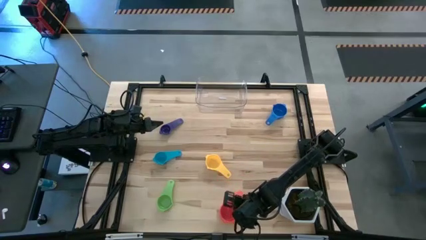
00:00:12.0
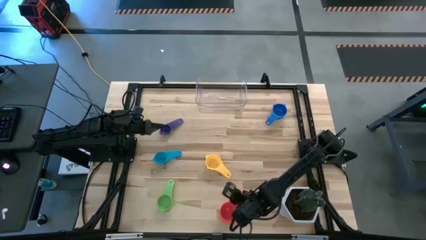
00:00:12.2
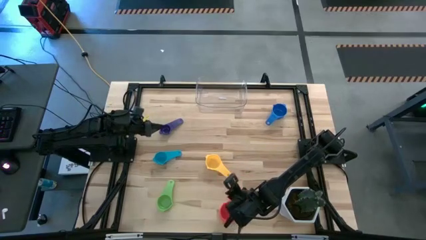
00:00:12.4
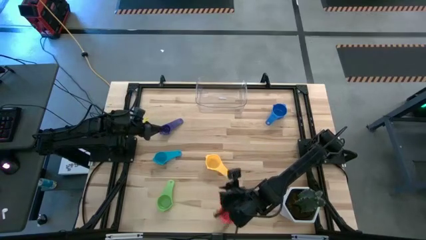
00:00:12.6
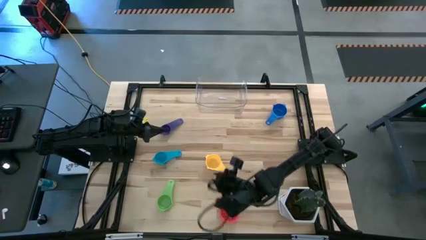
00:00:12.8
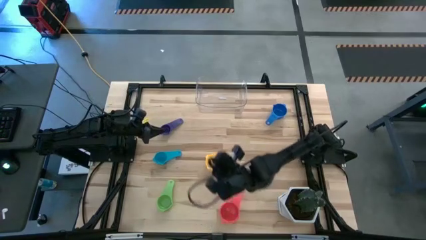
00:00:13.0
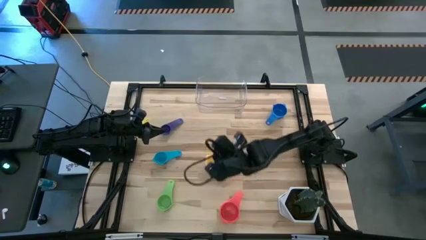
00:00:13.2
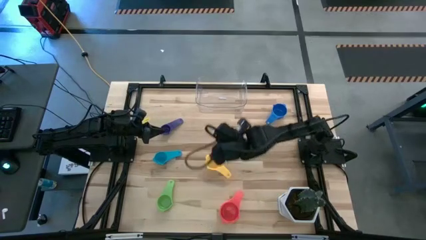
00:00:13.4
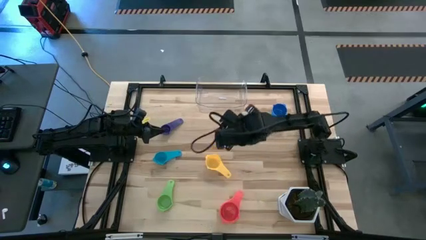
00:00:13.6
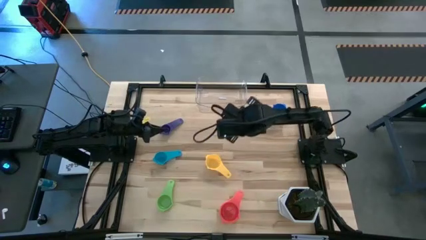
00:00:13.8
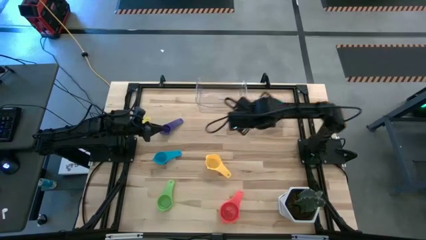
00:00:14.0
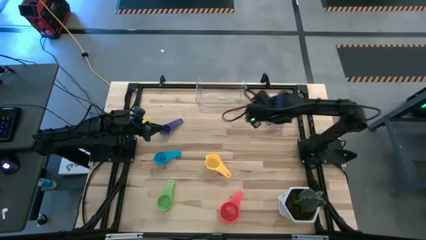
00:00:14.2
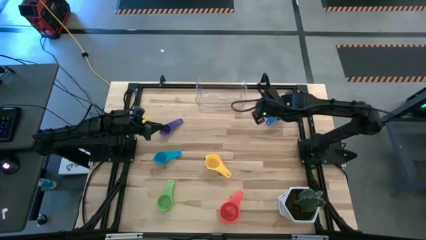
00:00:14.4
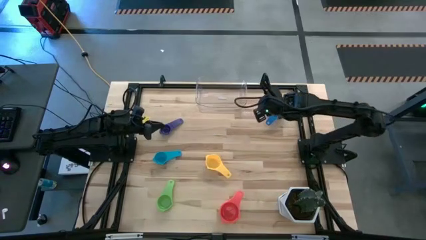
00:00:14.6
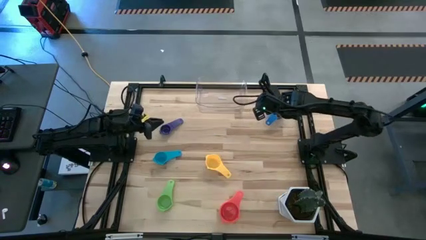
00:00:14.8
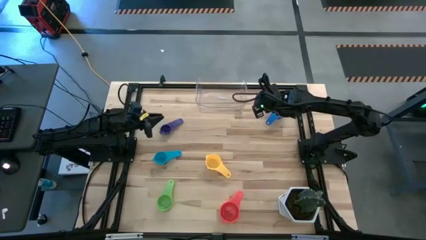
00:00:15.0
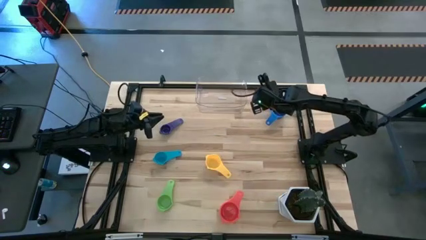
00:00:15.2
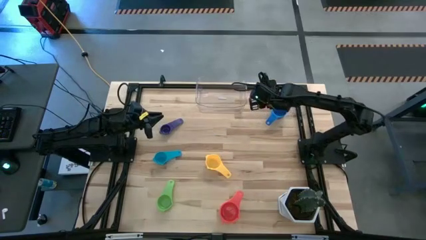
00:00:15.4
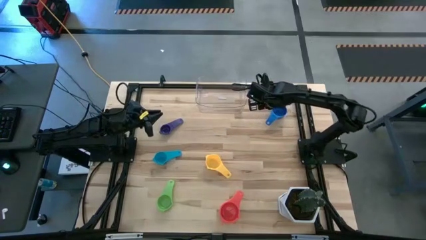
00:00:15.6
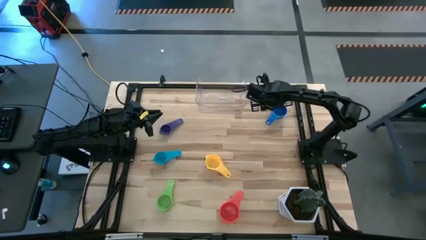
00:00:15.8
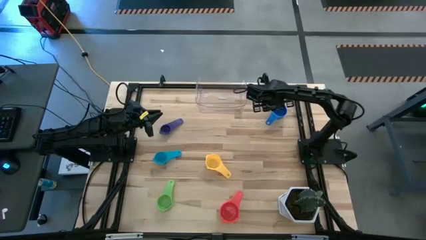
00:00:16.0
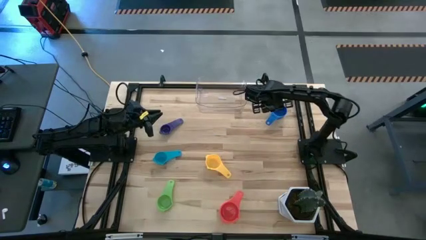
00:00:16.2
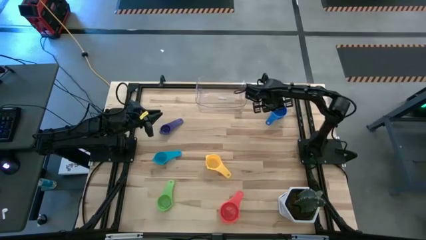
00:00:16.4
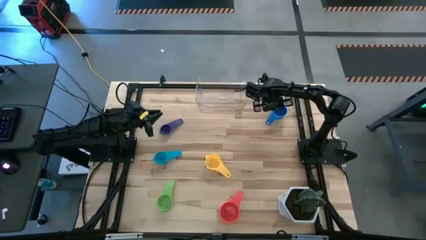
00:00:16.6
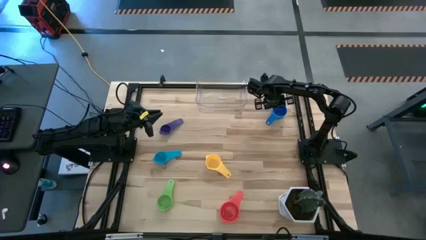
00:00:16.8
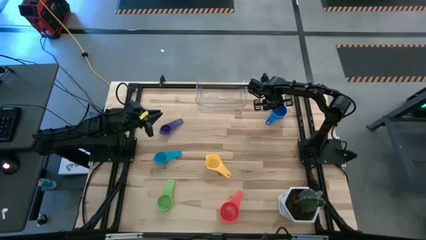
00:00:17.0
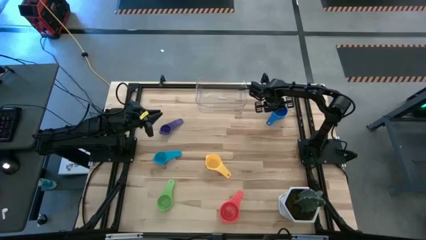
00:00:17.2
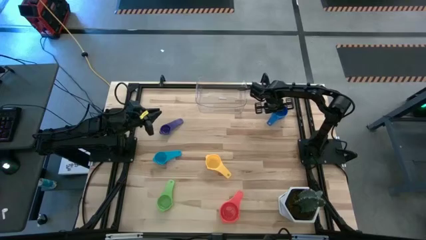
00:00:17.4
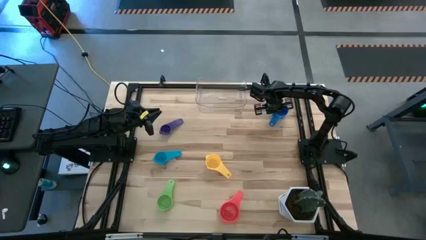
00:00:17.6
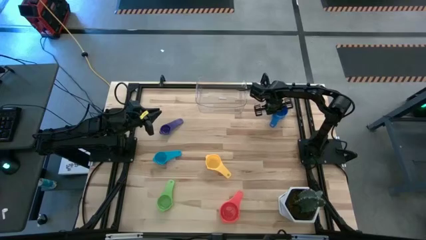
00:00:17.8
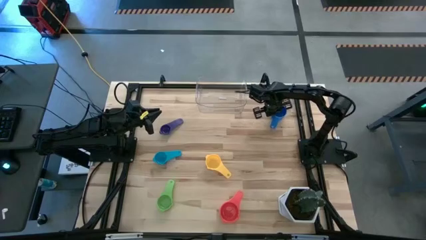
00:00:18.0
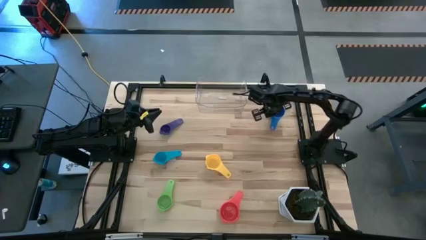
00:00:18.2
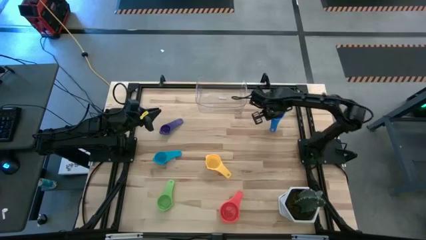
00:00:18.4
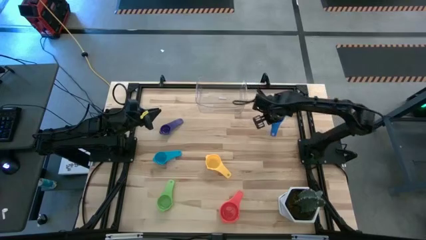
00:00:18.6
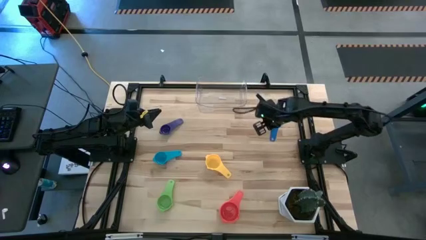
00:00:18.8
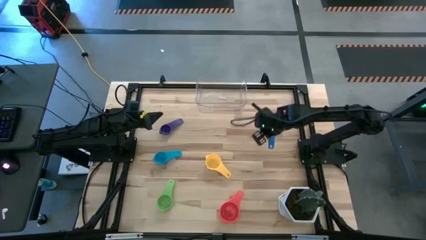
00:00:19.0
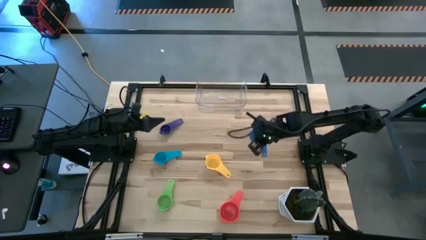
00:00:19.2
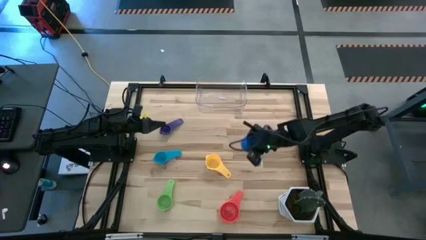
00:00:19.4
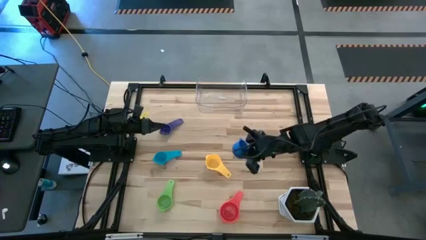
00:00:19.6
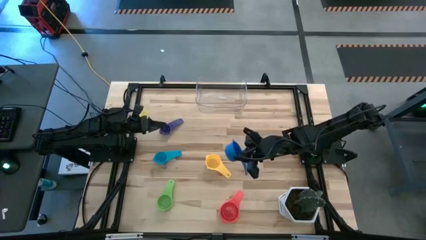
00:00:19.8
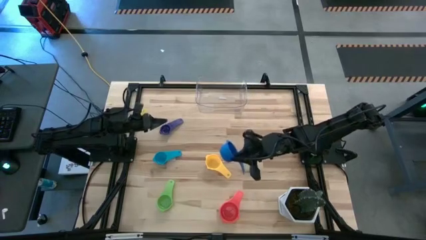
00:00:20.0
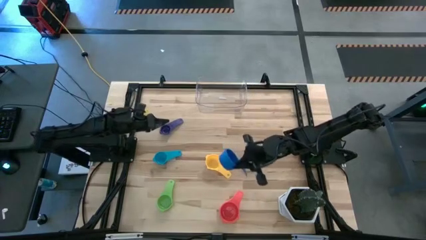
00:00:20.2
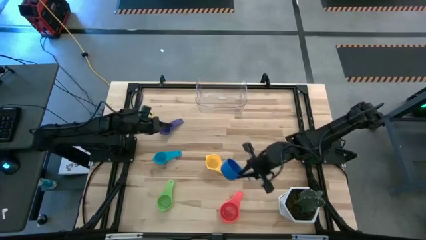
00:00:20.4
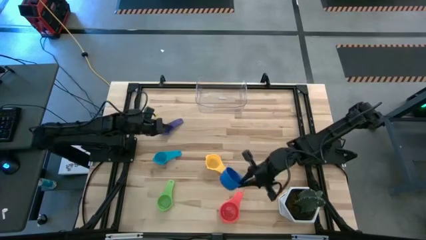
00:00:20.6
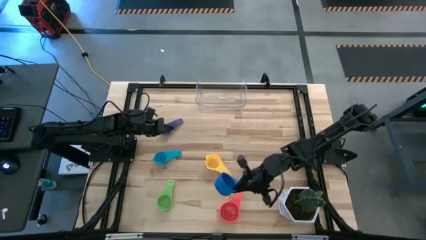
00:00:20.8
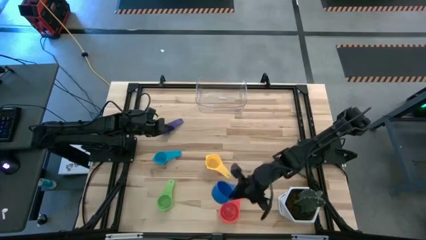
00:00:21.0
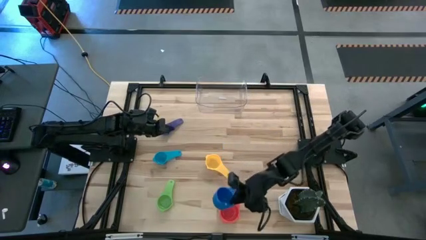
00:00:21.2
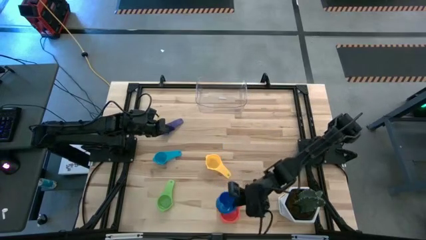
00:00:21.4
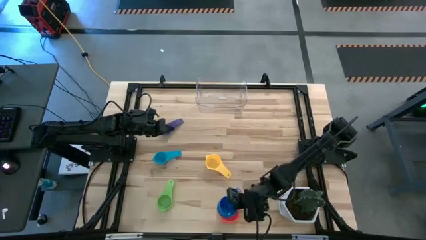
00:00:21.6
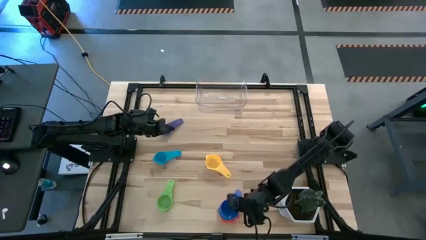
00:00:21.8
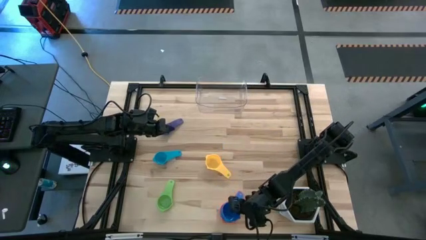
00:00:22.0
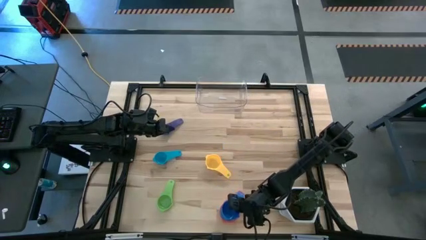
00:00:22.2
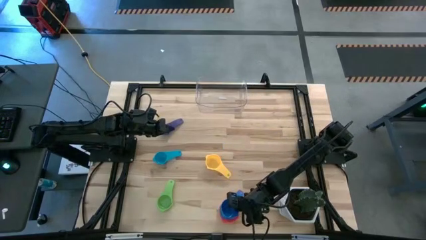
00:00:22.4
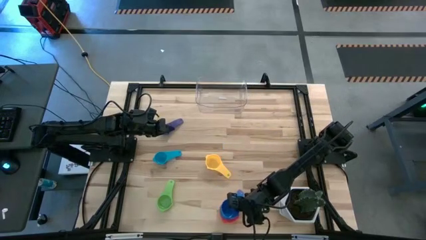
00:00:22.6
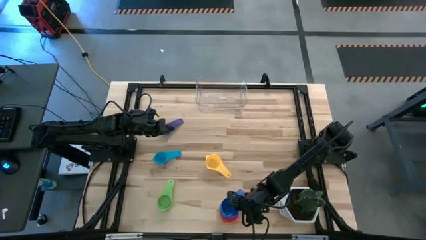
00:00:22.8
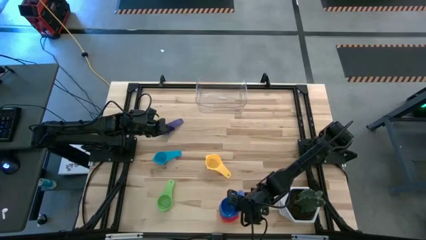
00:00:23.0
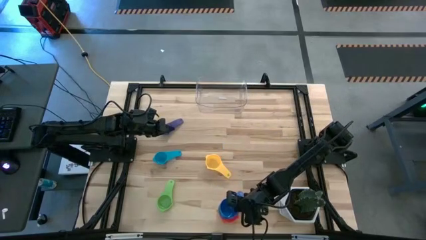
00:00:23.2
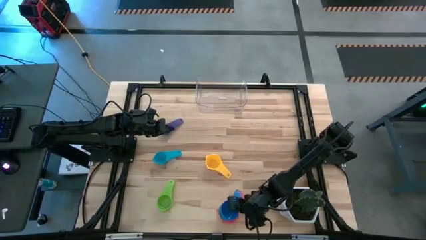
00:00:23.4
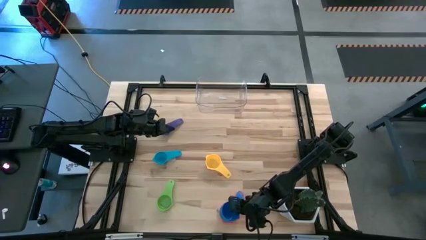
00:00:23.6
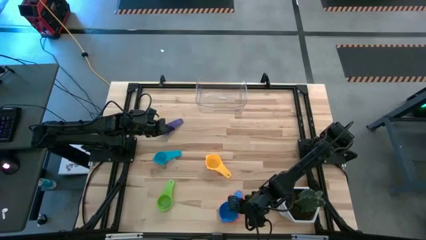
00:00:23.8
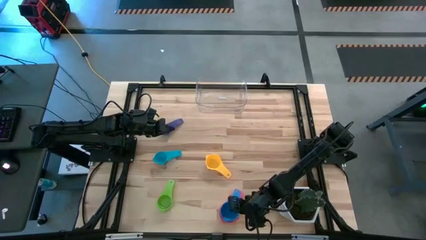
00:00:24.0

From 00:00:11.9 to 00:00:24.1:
Task: Nest measuring cups in basket
Stack the blue measuring cup on the red measuring cup

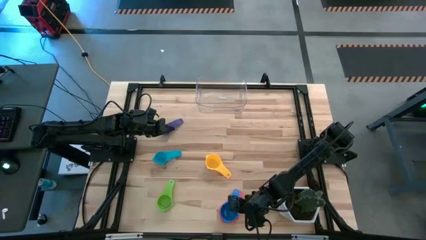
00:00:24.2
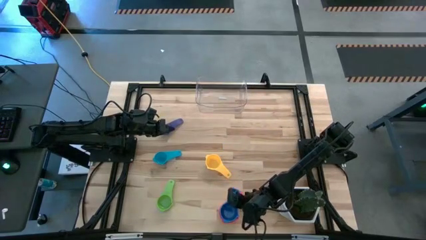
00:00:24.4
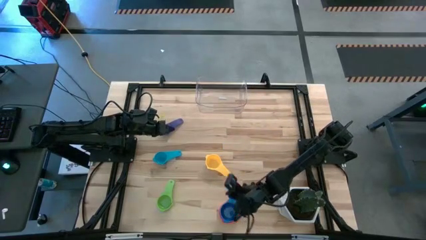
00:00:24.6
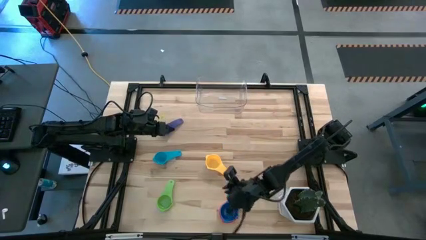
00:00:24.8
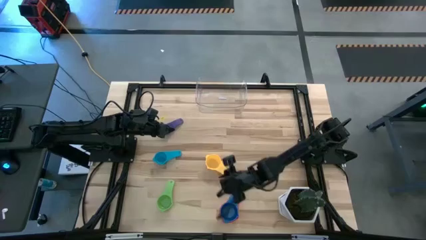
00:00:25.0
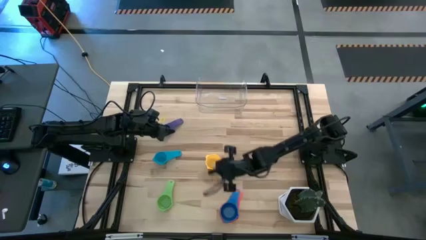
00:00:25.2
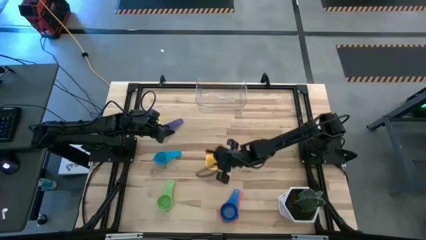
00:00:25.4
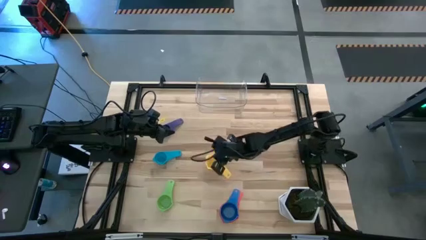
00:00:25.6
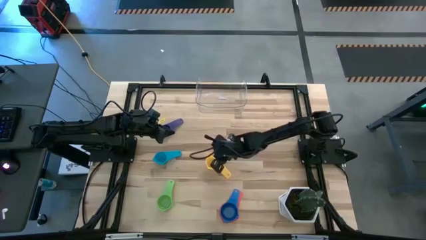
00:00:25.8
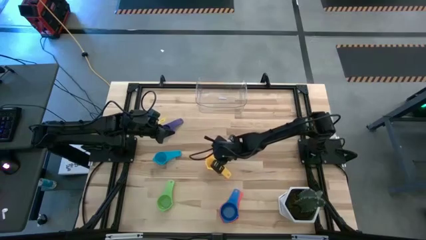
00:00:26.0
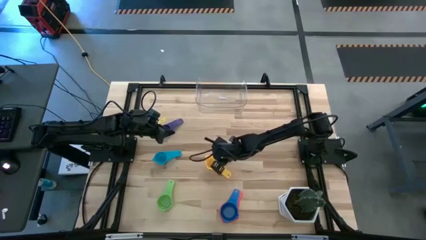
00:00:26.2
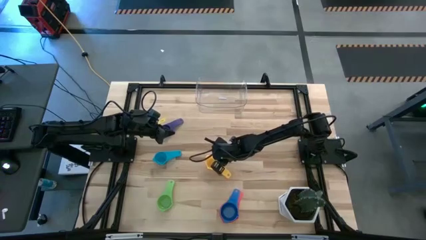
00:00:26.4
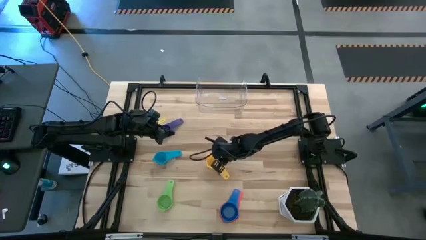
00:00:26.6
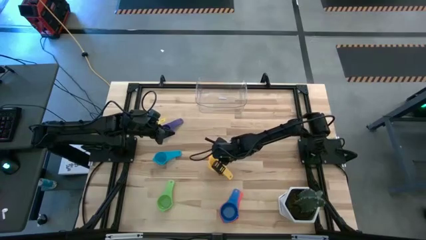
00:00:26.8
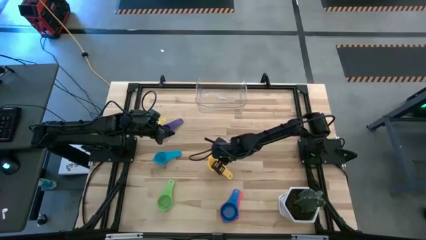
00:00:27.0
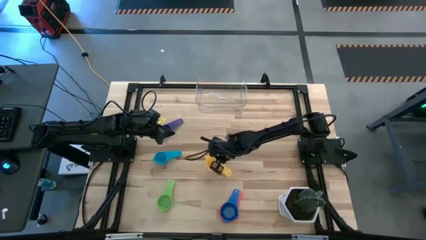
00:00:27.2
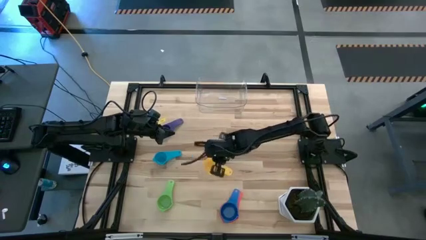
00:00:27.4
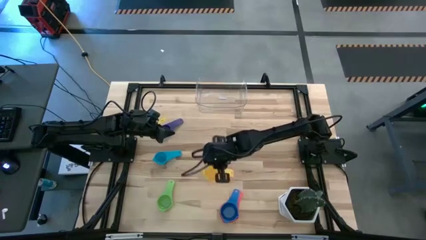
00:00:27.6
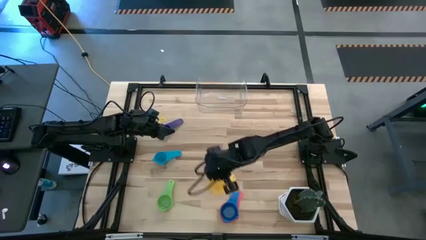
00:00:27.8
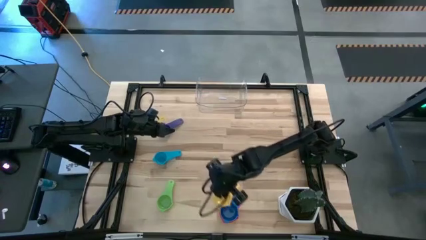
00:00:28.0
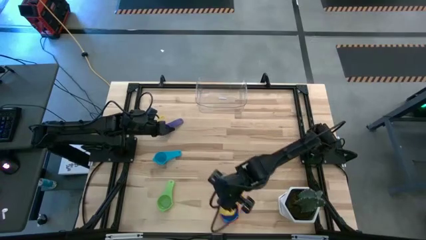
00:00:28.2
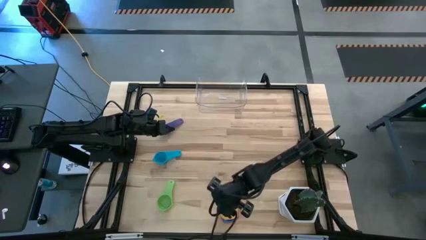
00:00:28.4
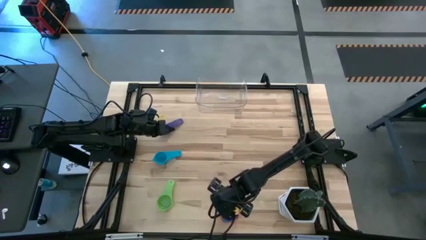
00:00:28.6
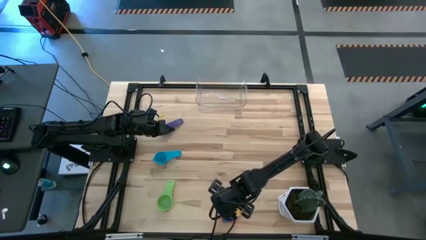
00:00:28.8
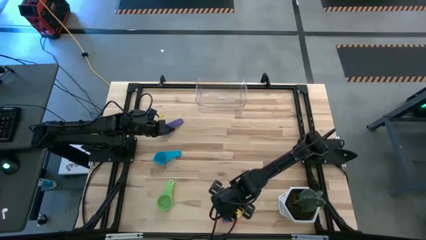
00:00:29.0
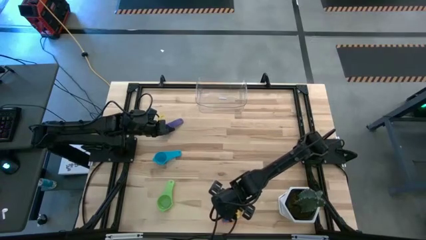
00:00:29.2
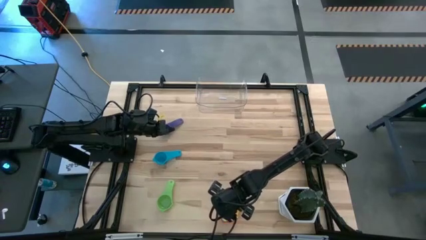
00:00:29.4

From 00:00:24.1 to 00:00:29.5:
Stack the yellow measuring cup on the blue measuring cup
